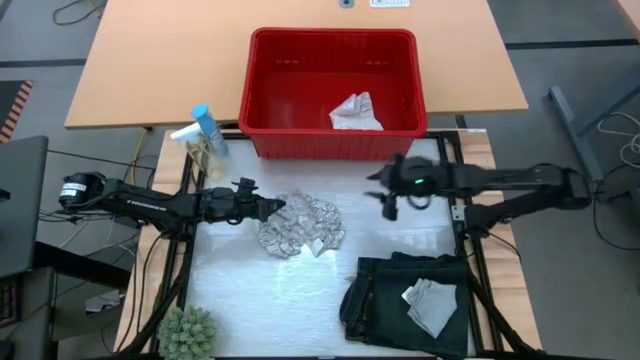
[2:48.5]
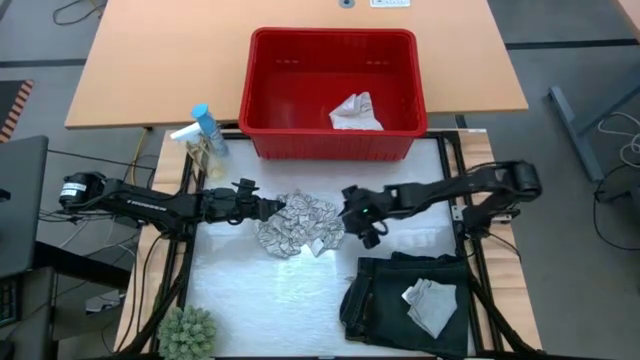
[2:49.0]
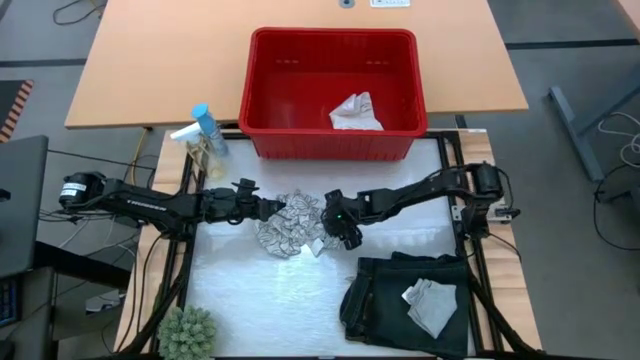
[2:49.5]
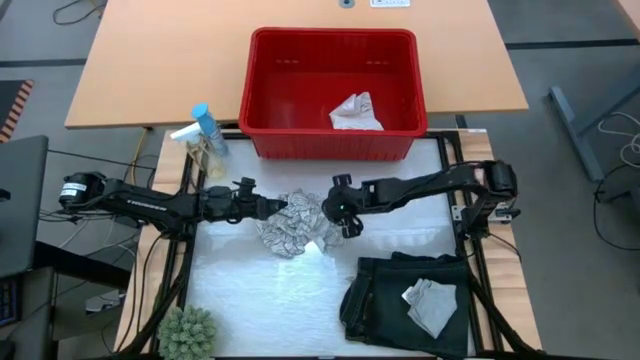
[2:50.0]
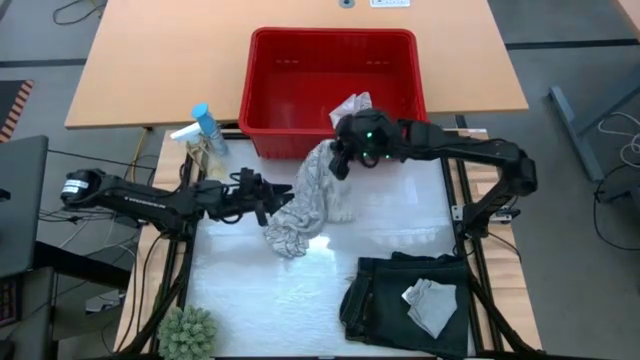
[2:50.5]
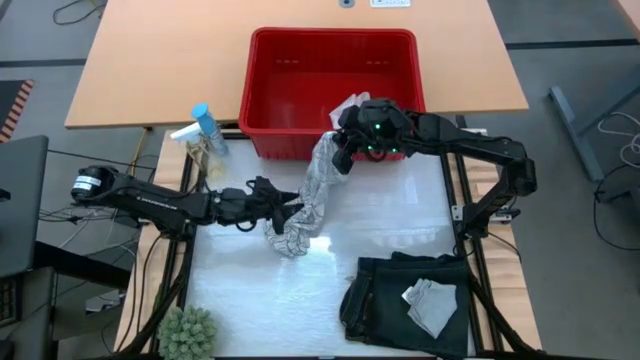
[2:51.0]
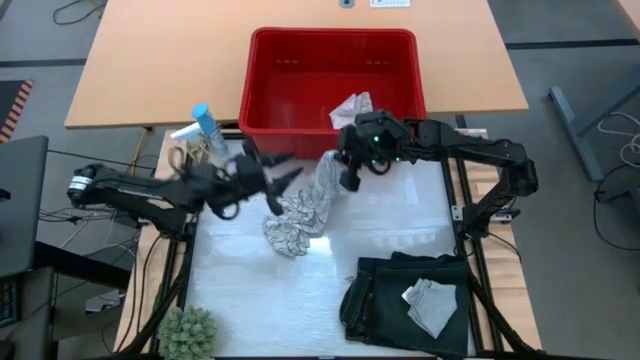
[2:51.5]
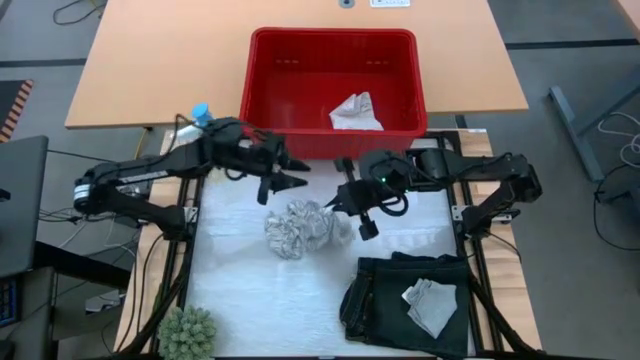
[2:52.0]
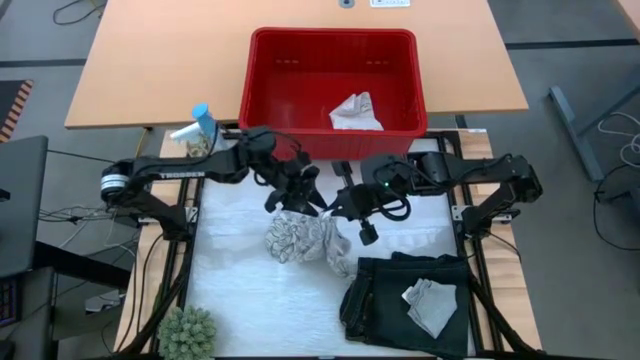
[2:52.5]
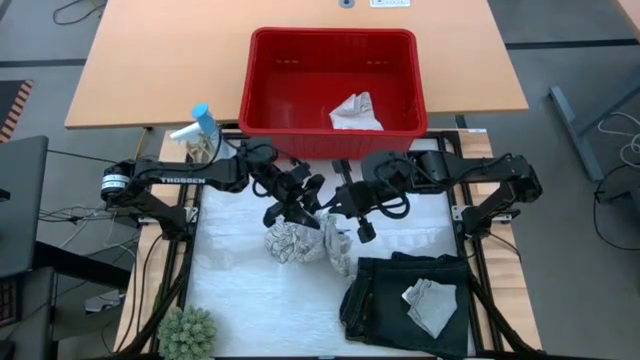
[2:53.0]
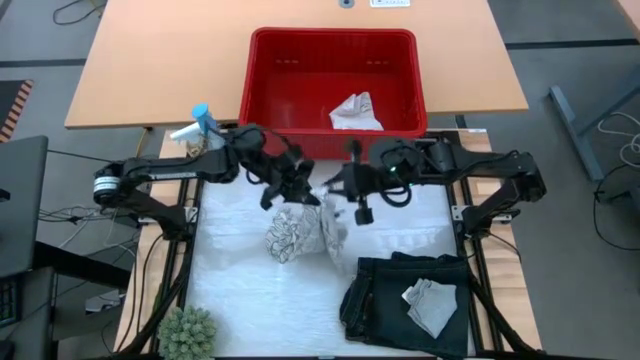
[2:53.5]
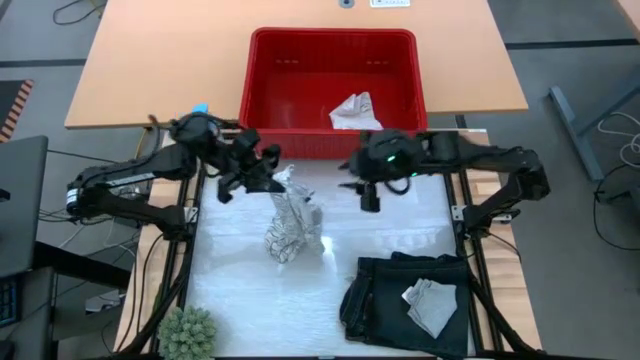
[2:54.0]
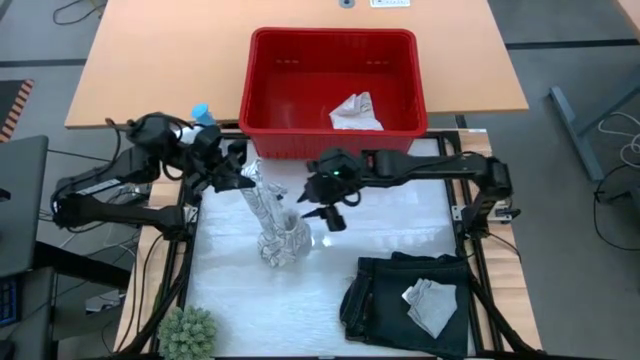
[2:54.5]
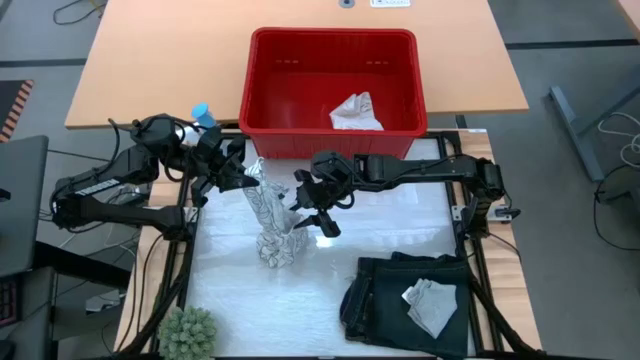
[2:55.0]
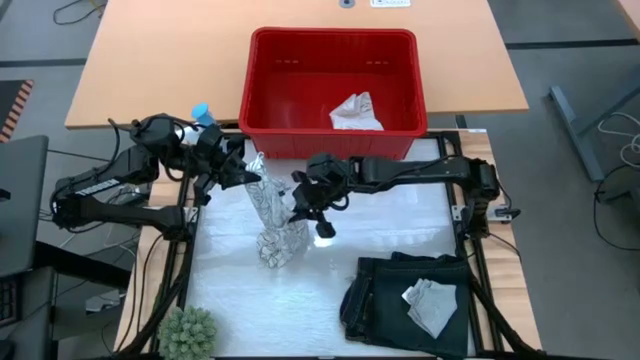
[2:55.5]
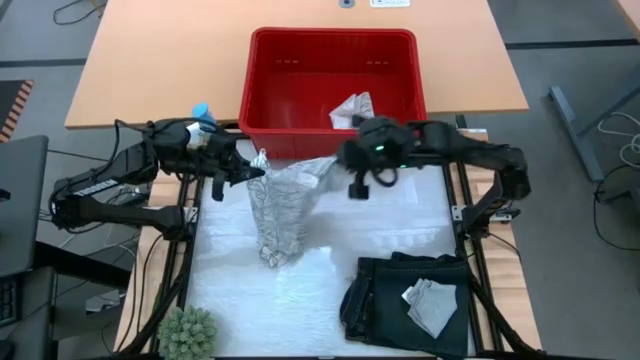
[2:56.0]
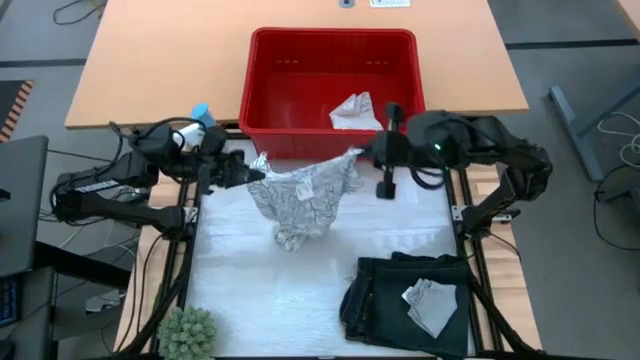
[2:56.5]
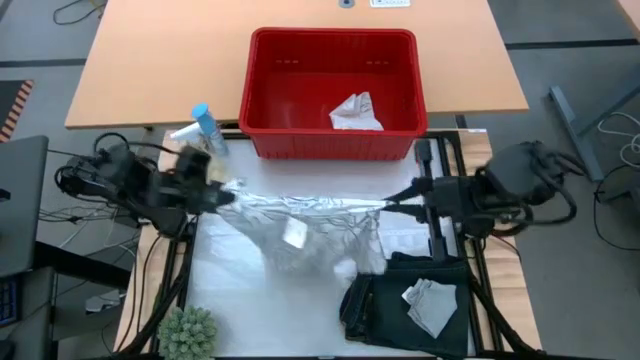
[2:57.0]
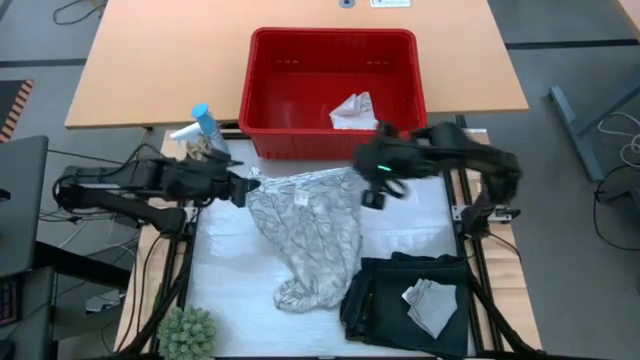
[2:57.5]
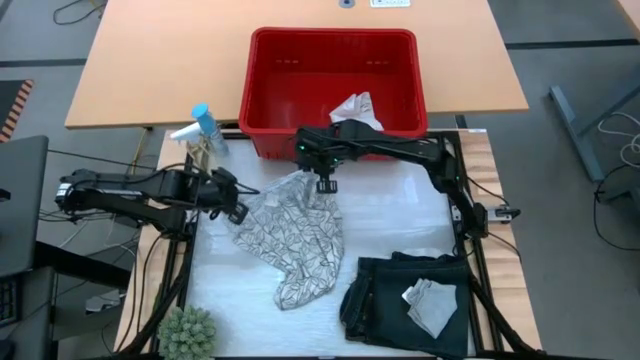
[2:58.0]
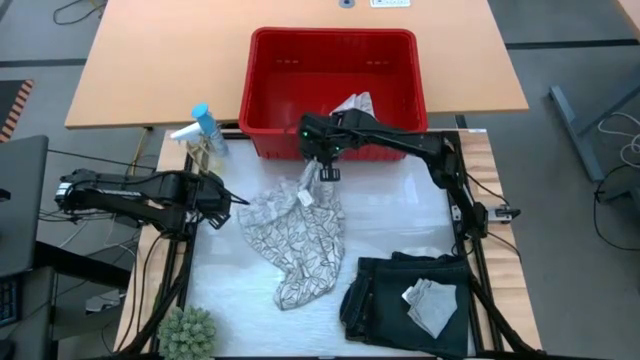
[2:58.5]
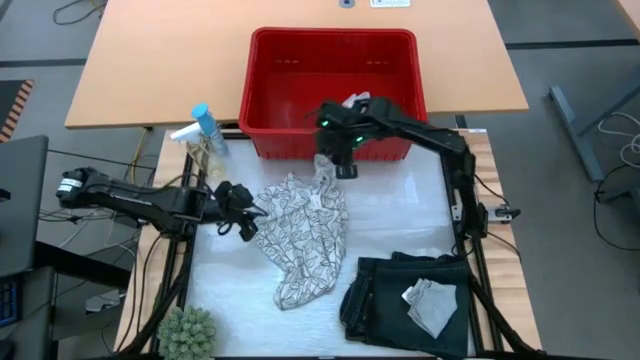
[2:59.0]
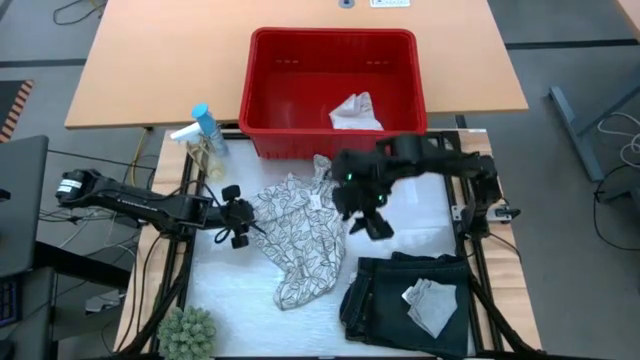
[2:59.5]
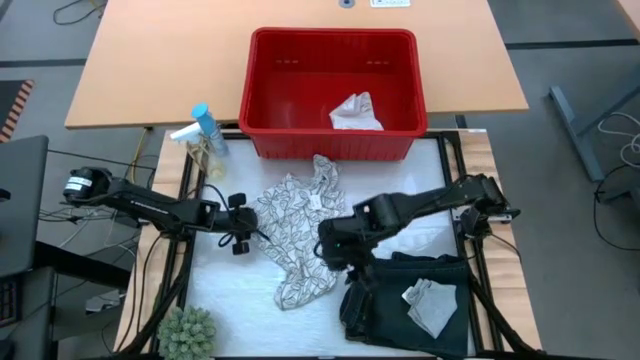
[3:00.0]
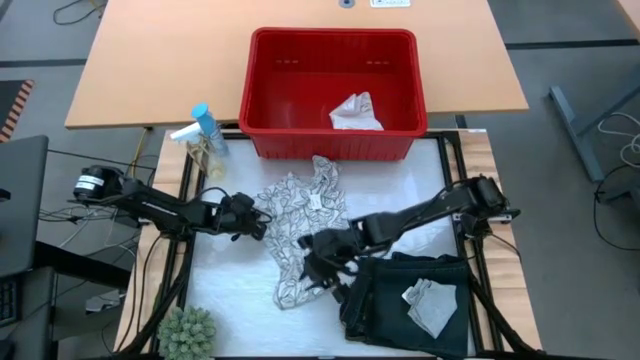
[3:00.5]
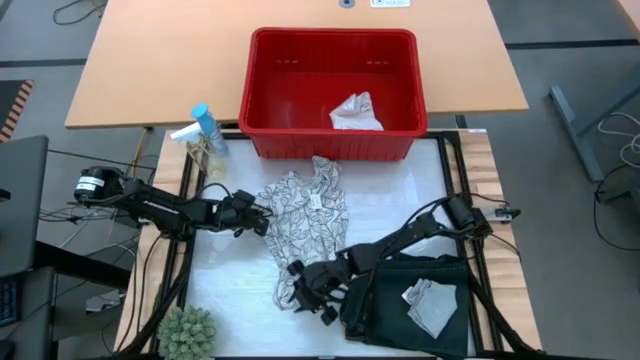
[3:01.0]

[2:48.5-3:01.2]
Task: Fold Laundry from Bin
Fold the white from the red laundry bin

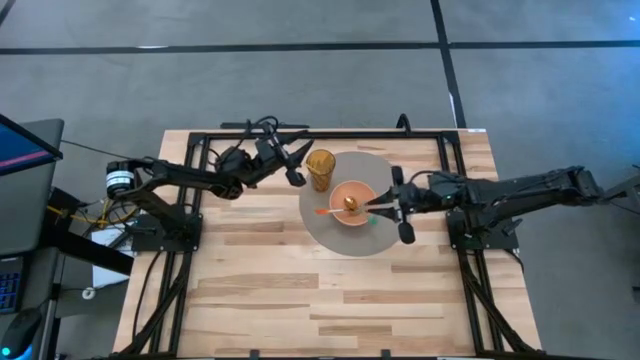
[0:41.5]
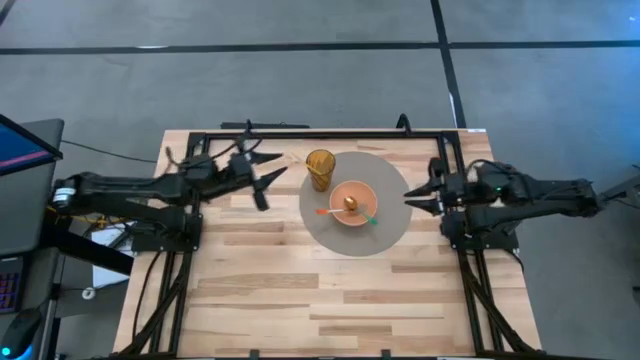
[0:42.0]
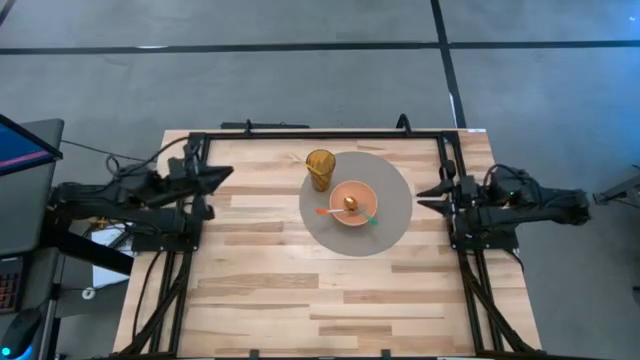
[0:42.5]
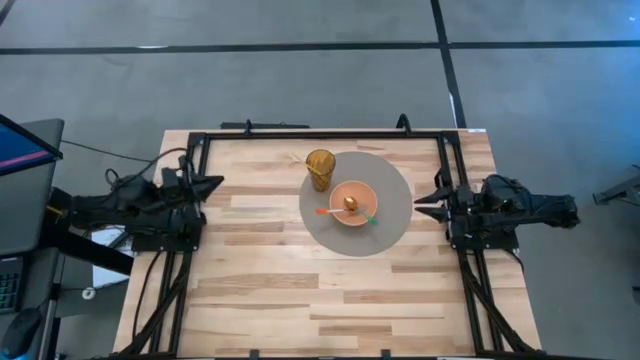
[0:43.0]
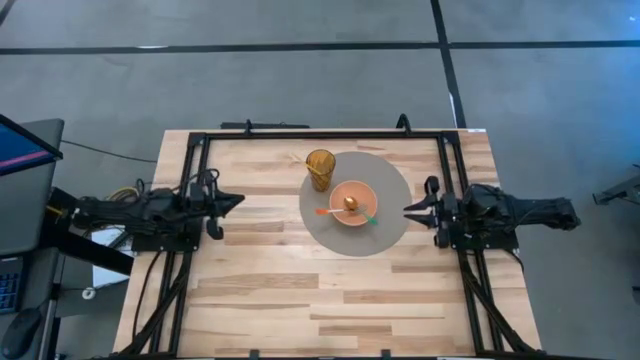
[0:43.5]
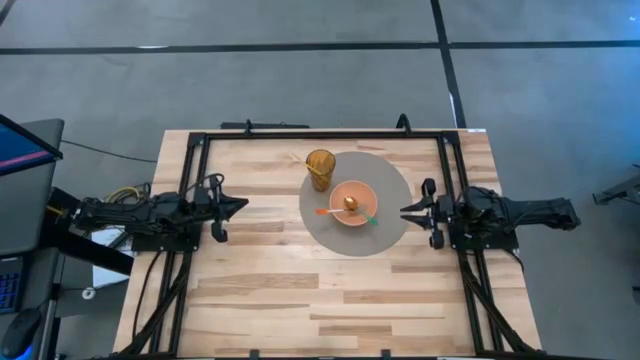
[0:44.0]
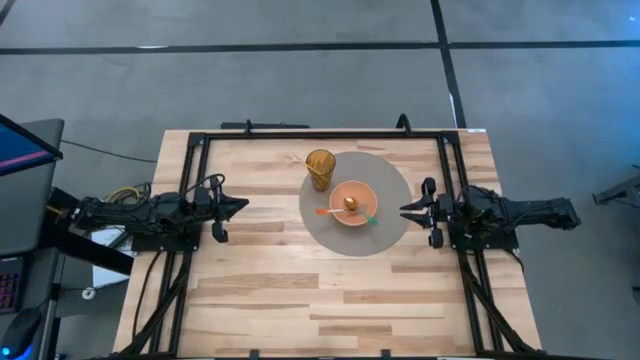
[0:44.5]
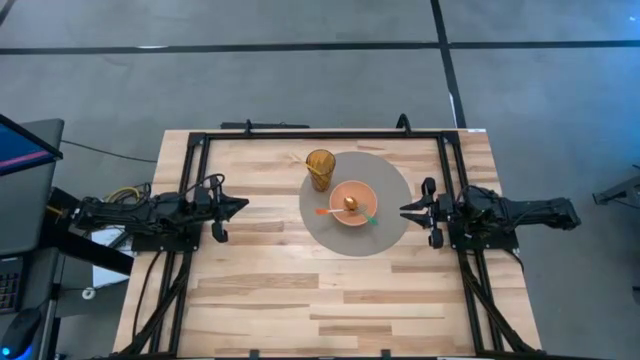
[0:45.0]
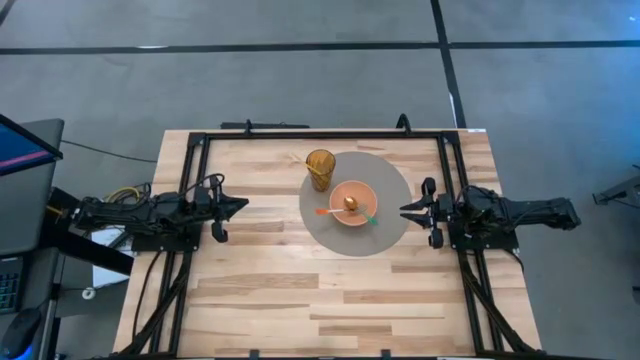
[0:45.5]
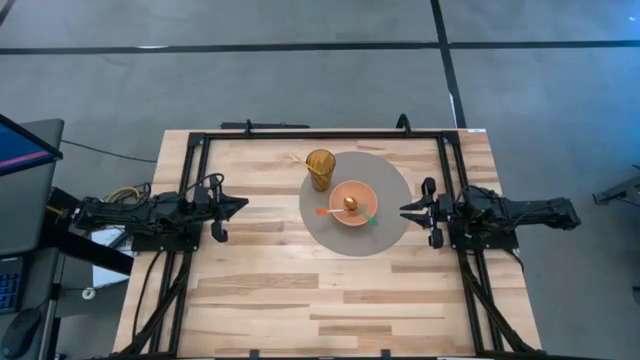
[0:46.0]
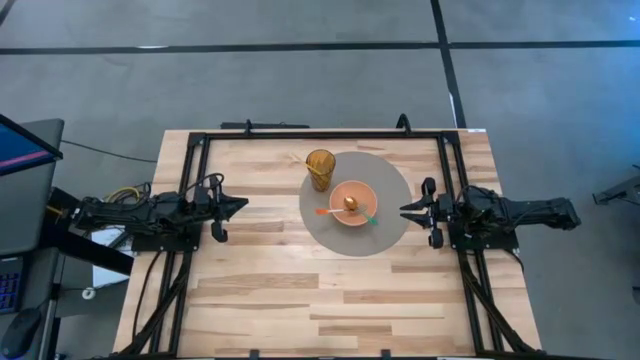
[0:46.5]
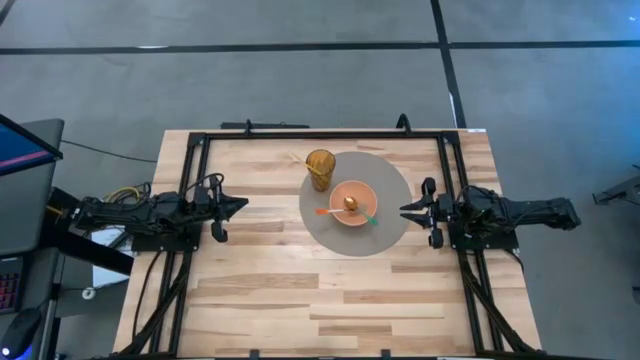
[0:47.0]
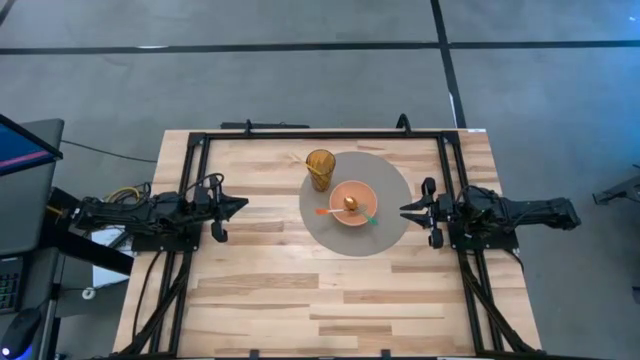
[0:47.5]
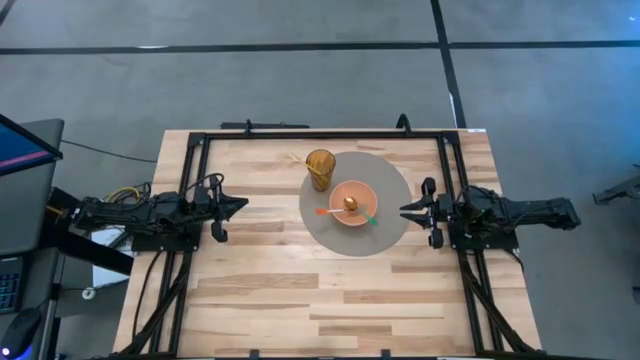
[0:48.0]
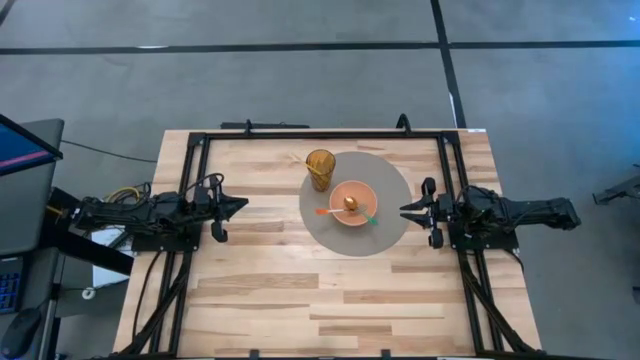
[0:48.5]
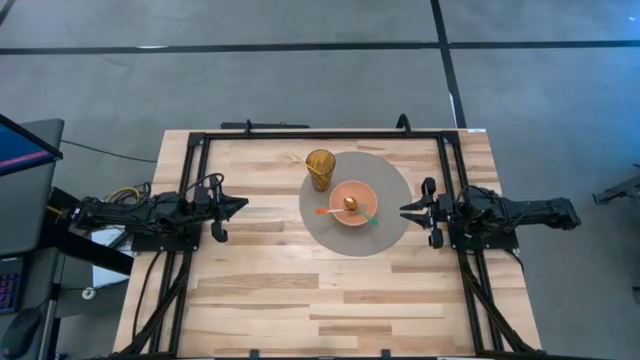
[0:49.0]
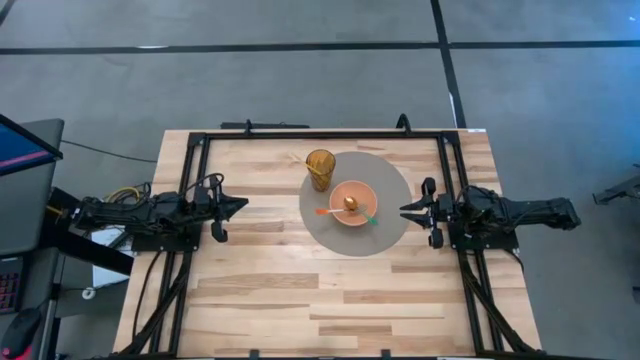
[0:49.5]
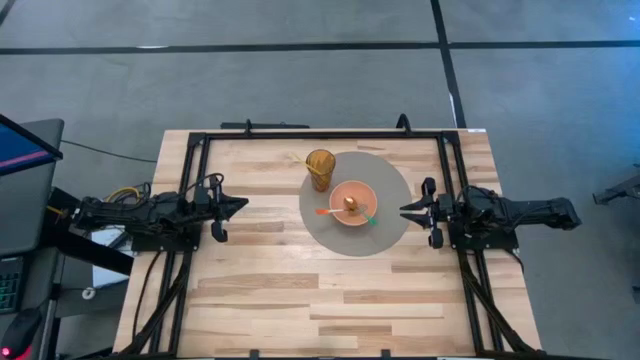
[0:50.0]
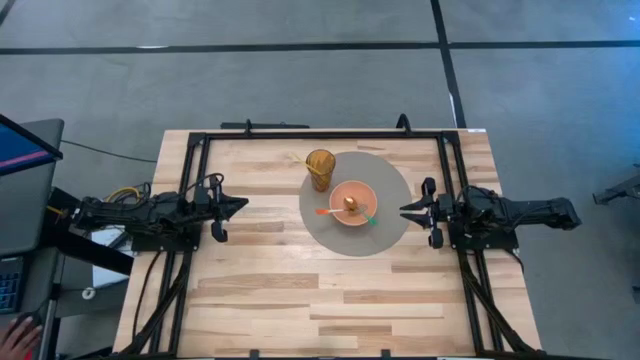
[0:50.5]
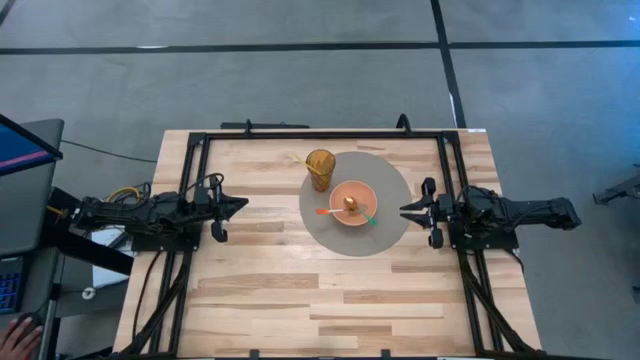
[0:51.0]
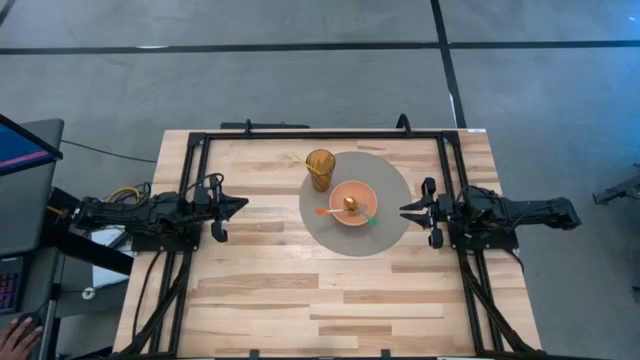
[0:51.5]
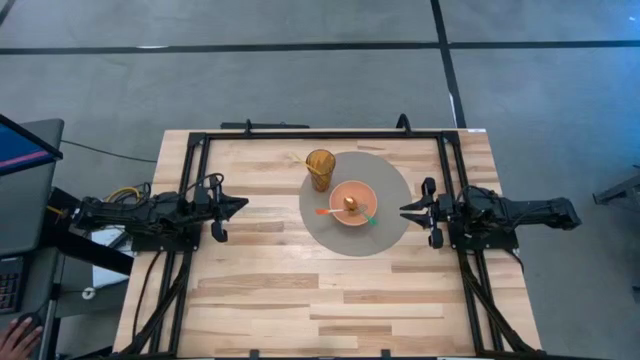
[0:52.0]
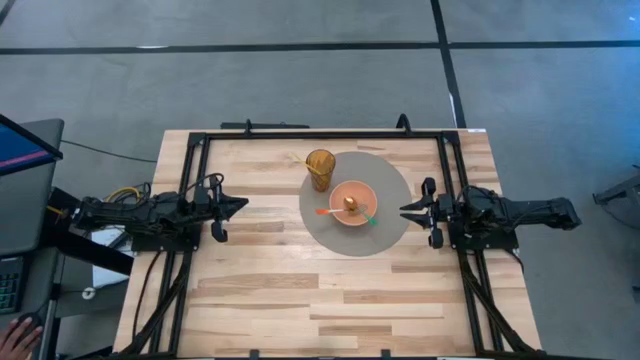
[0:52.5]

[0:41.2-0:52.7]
Task: Pick & Place Utensil
Return to Home Position
